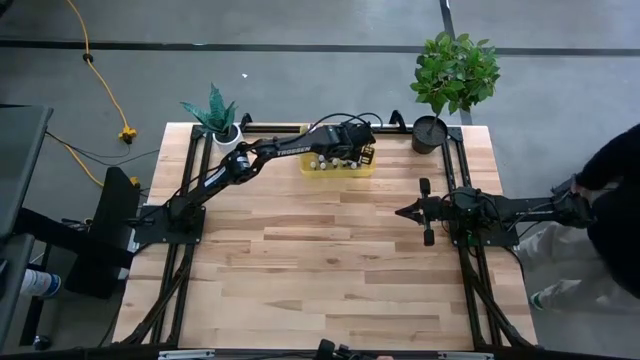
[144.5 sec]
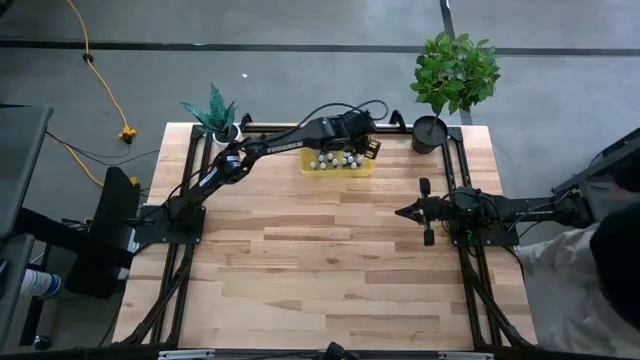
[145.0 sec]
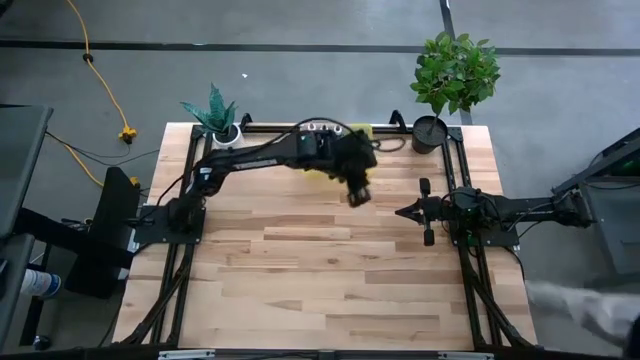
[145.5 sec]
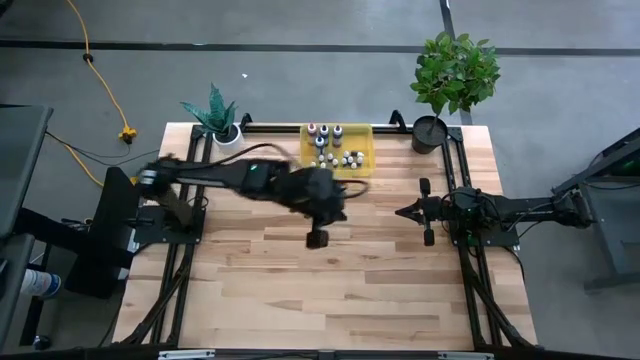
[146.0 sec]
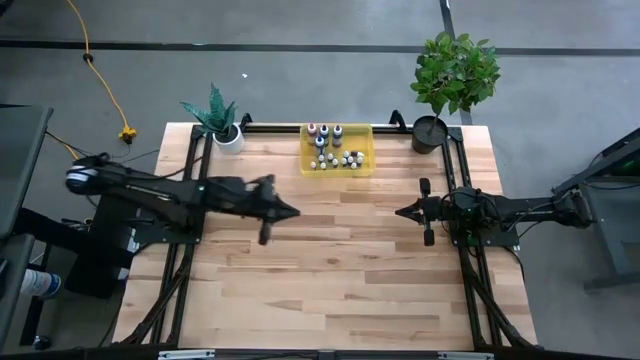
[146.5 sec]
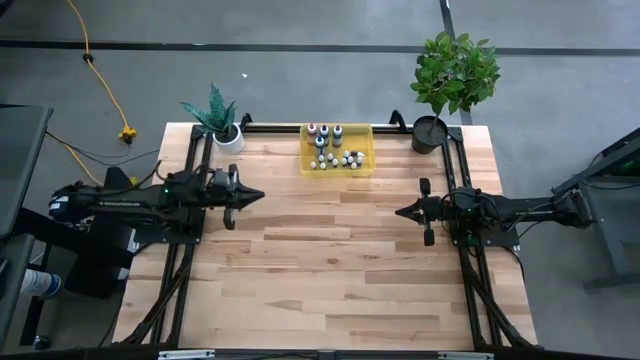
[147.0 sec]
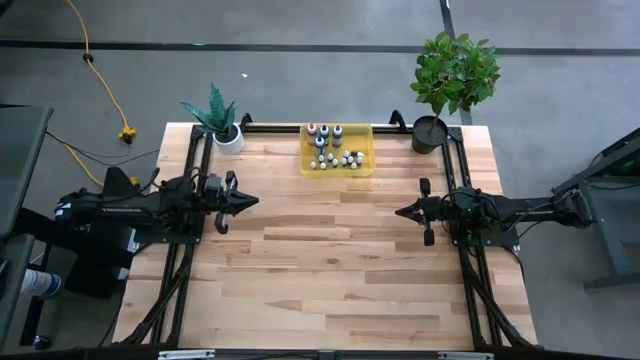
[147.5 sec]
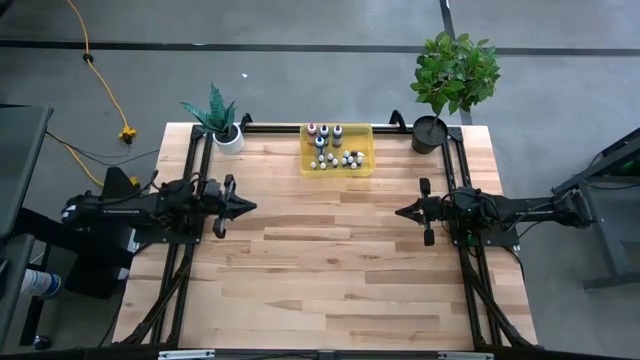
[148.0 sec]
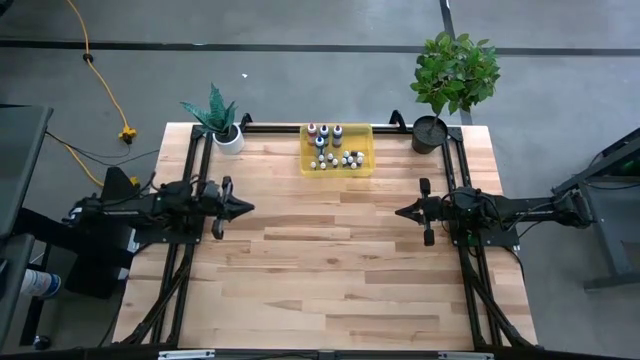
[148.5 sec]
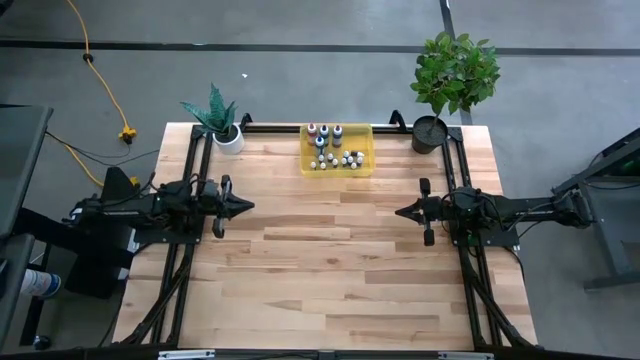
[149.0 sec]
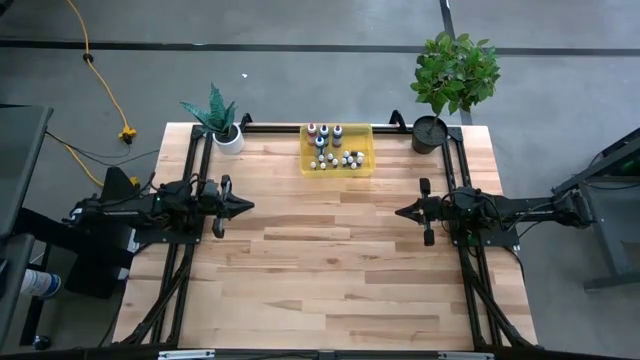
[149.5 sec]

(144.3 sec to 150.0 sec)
Task: Pick & Place food coloring
Return to Home Position

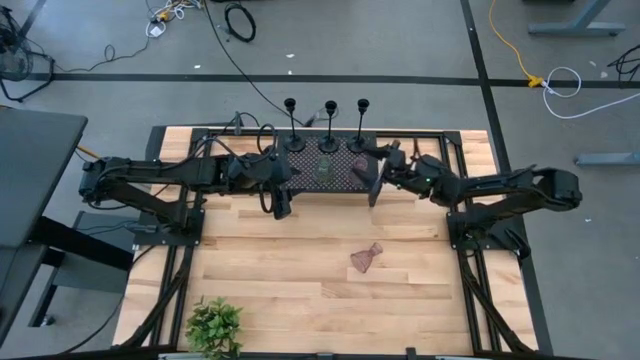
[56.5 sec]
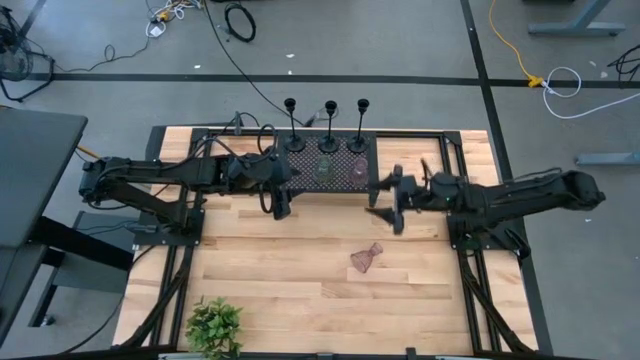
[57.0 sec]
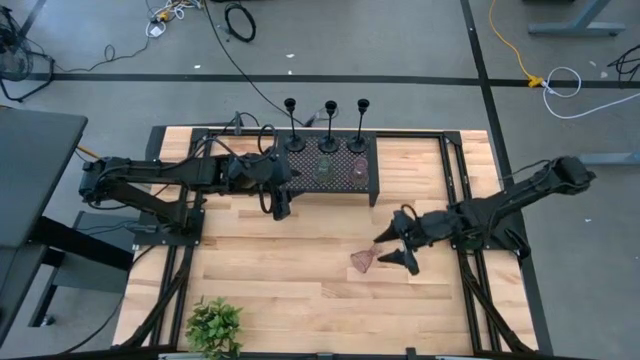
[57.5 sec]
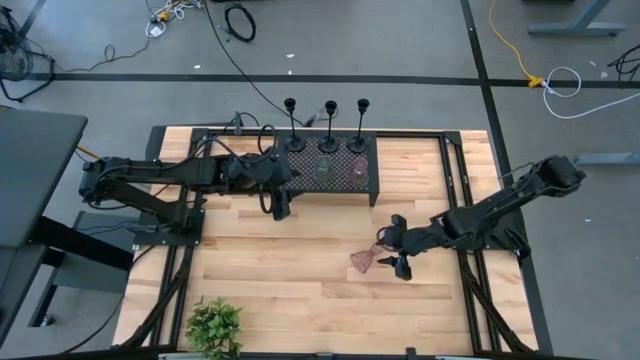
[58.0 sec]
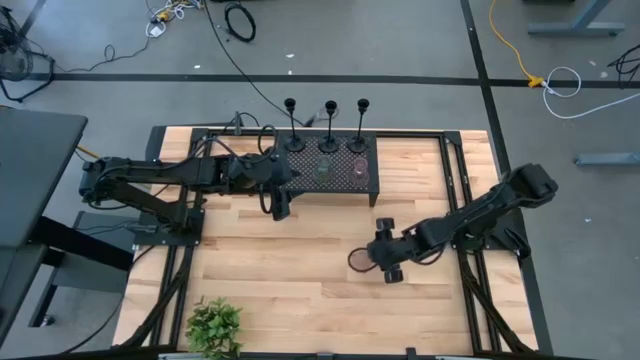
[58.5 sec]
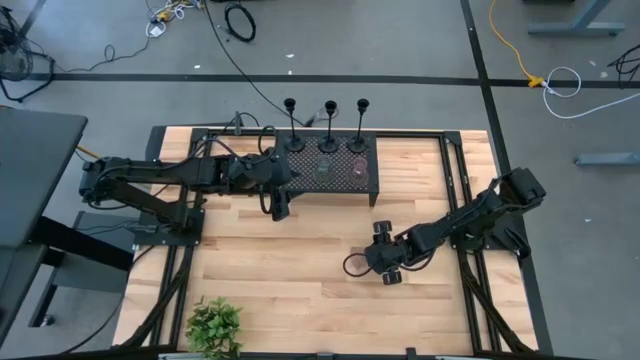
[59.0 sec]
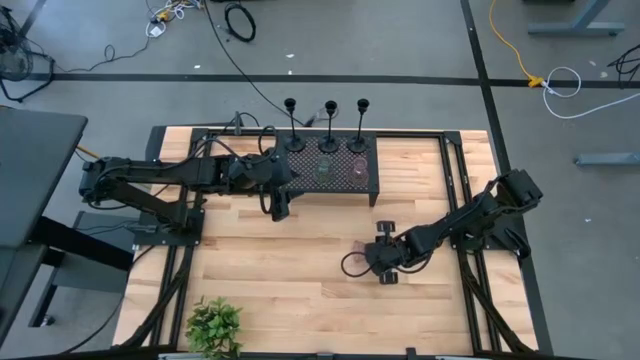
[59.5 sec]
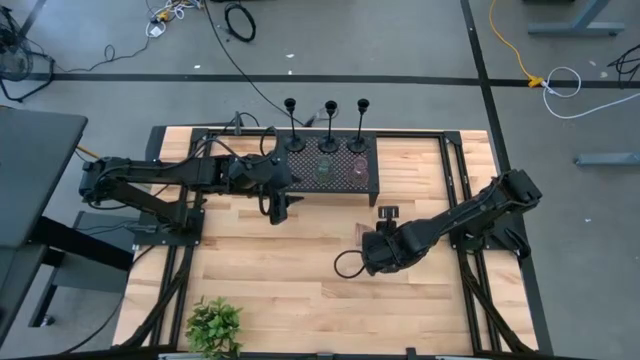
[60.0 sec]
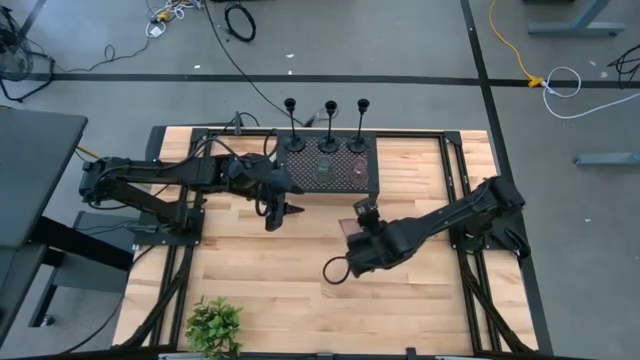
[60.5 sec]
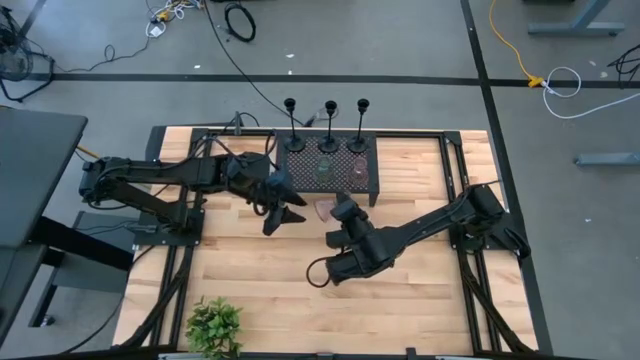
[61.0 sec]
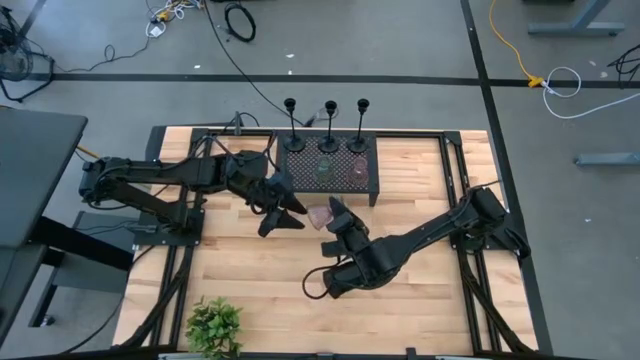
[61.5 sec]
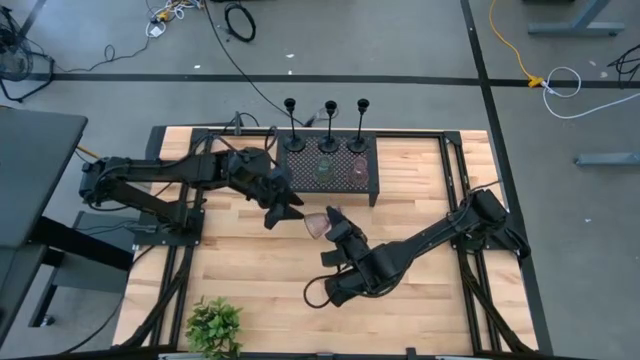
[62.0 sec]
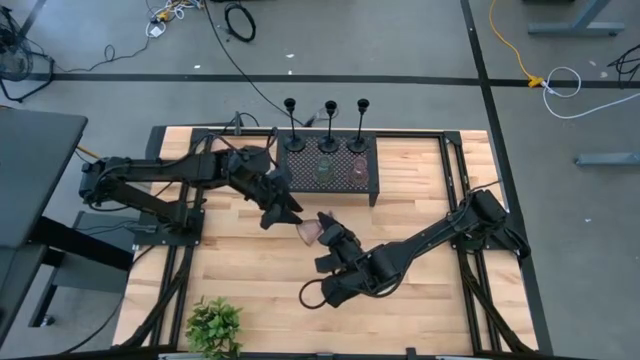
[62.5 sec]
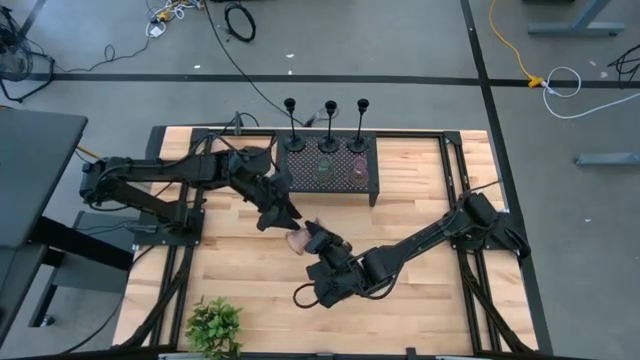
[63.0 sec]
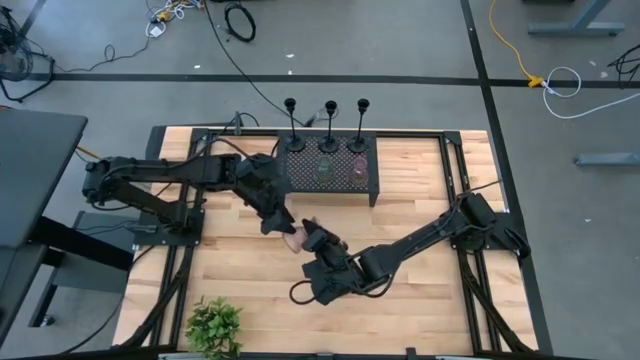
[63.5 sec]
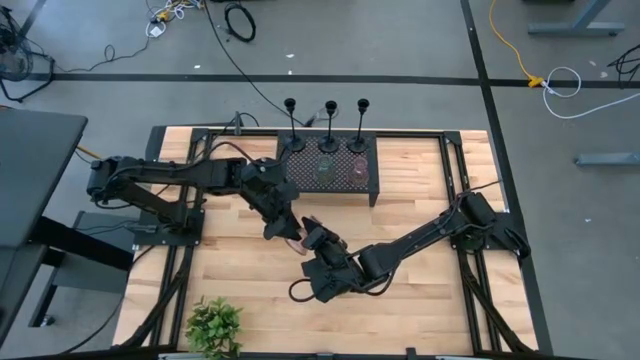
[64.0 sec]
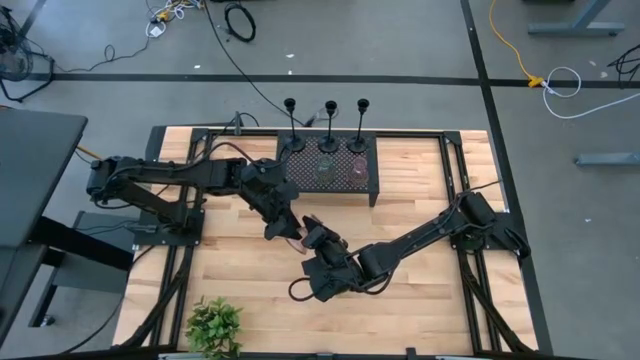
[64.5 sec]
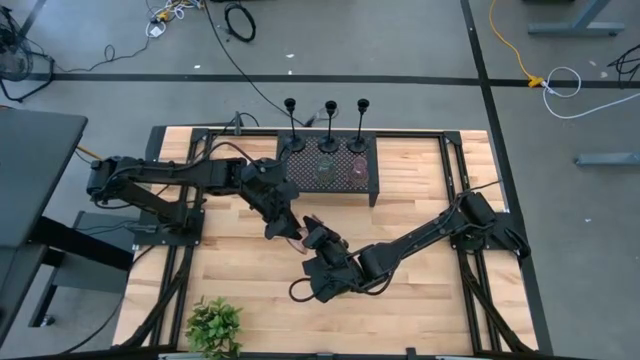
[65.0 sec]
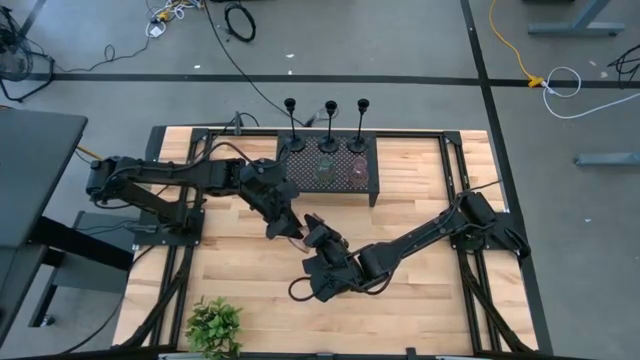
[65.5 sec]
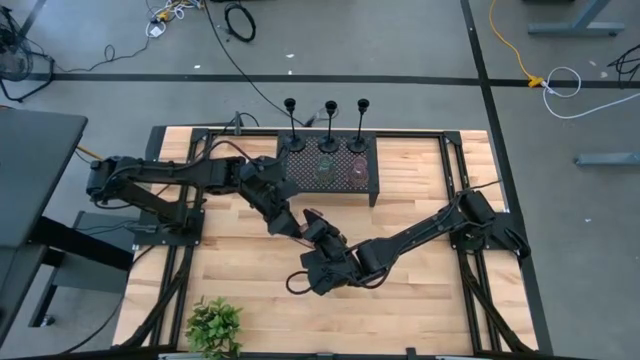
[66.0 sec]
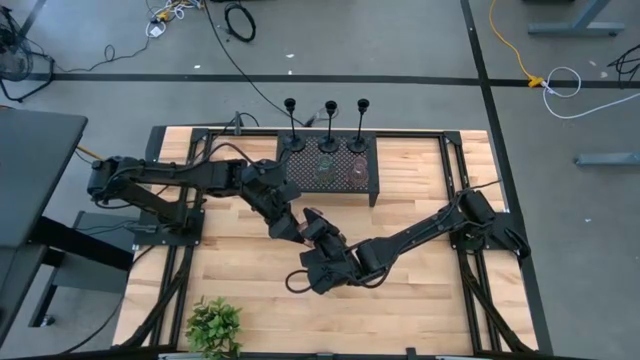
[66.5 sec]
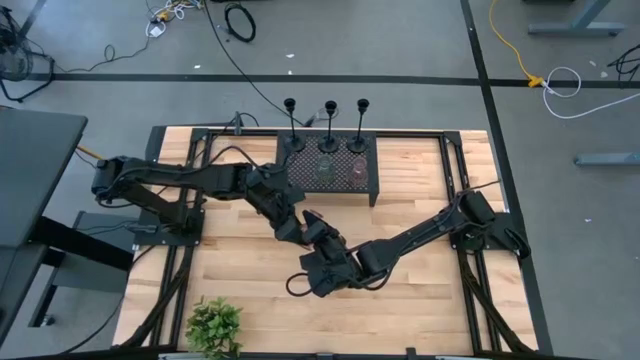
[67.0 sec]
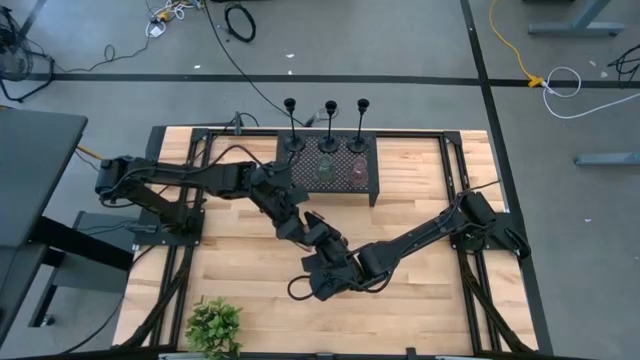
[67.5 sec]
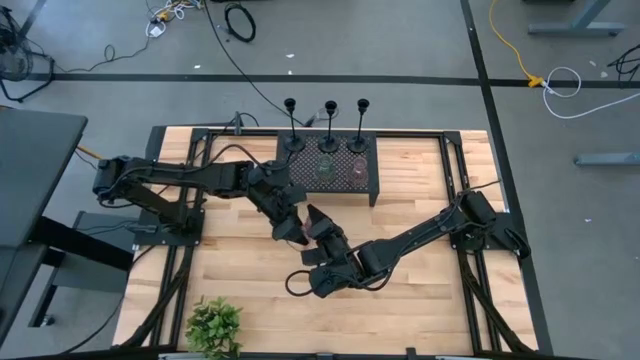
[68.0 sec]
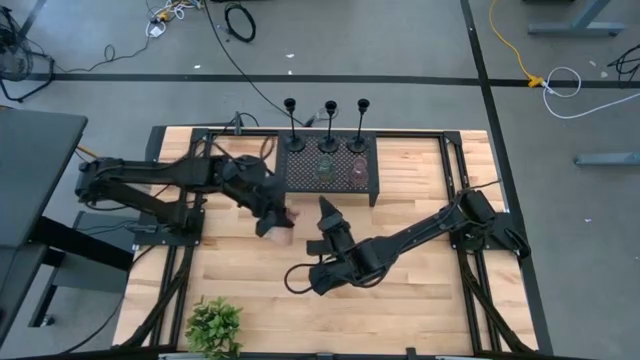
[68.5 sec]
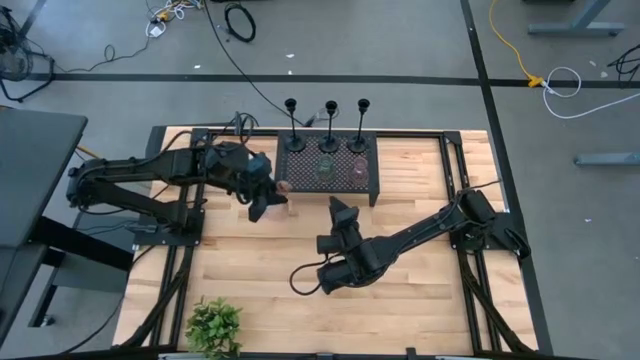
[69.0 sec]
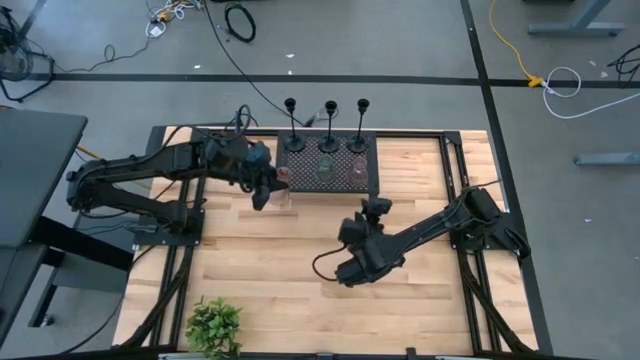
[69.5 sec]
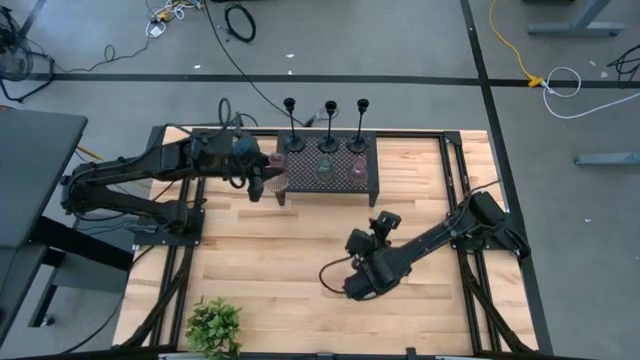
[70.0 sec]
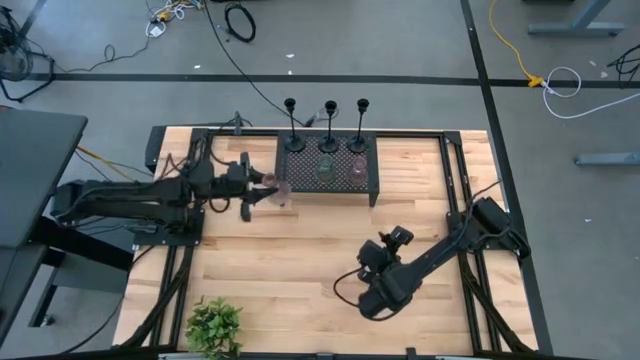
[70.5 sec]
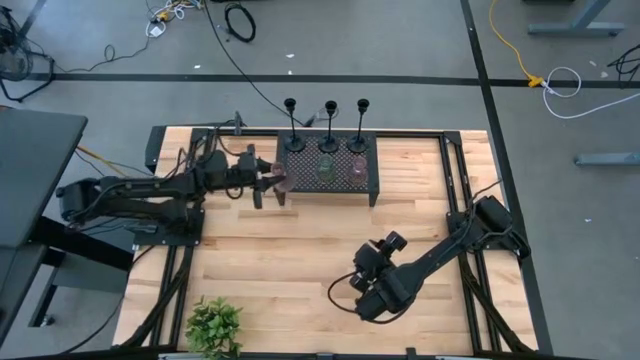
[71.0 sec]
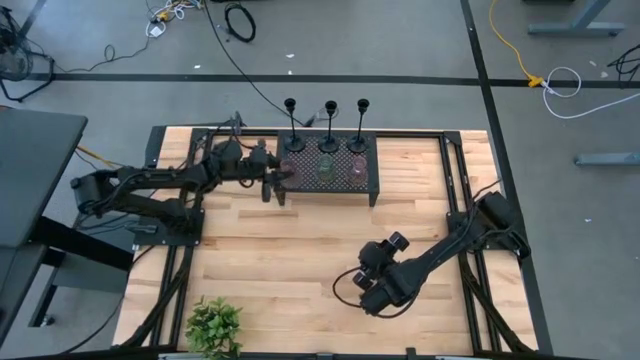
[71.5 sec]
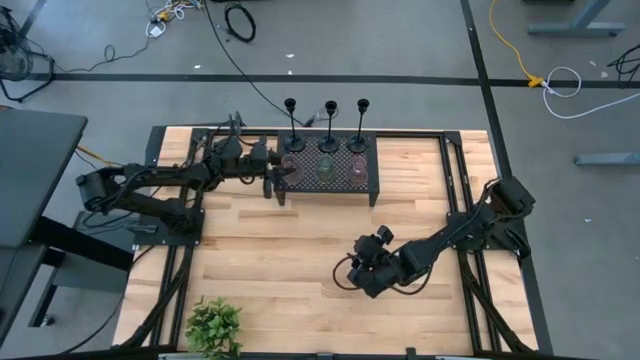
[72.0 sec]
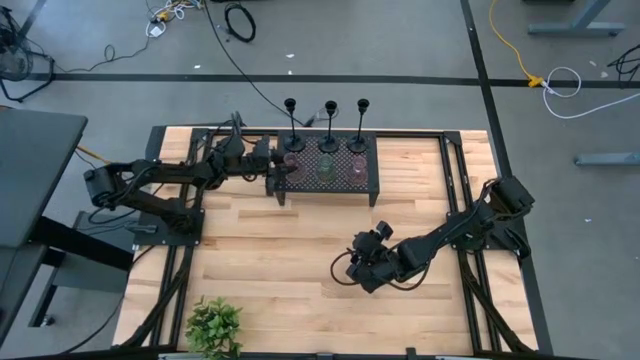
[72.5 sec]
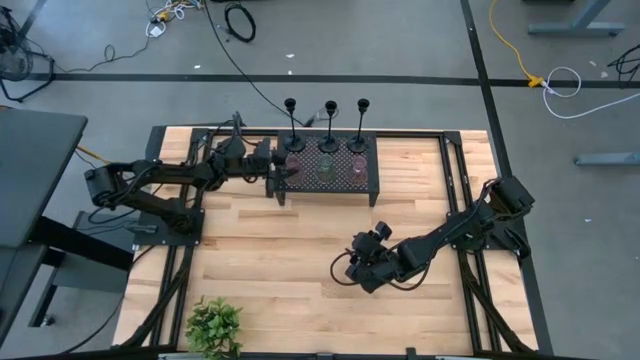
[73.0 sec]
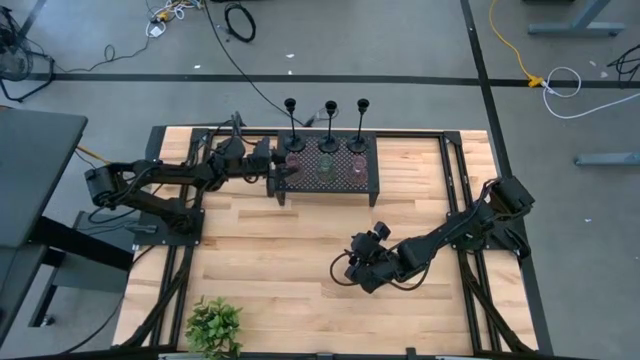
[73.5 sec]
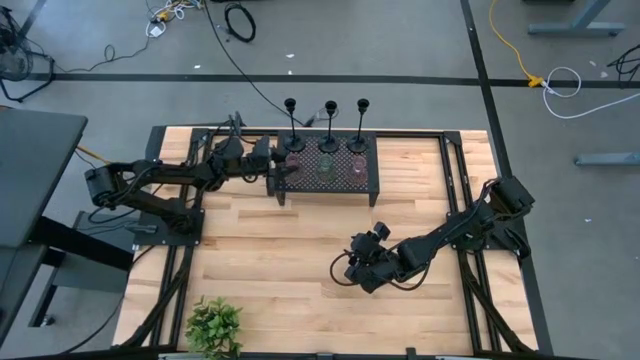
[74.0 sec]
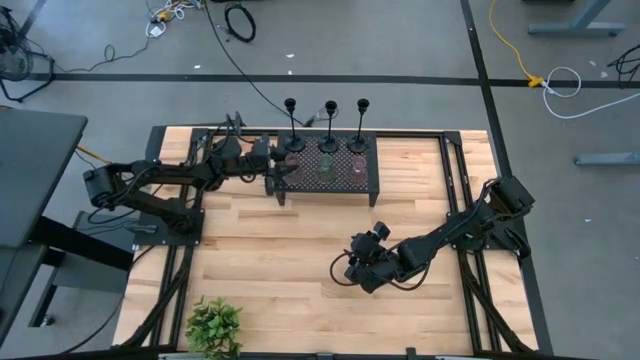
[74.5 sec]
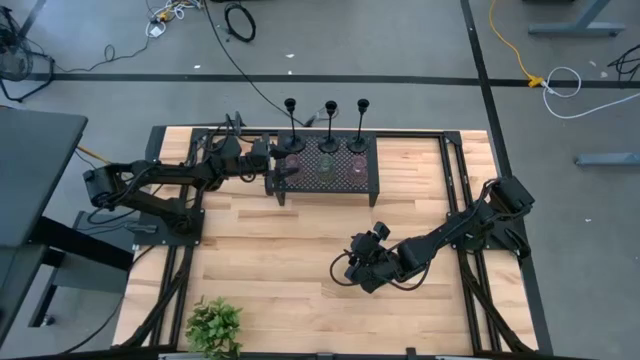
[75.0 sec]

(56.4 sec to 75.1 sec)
Task: Pick & Place candle stick holders
Put the purple glass candle holder on the shelf aligned with the other green and purple glass candle holders
